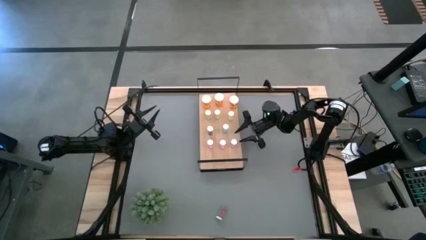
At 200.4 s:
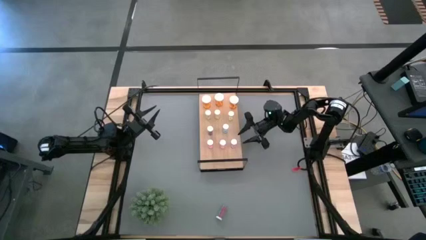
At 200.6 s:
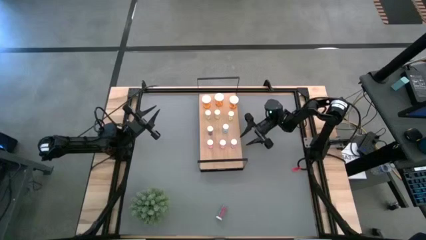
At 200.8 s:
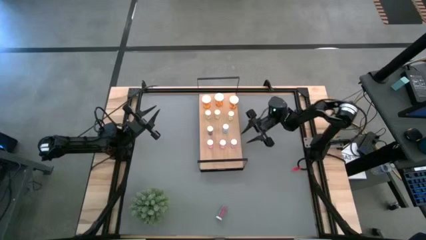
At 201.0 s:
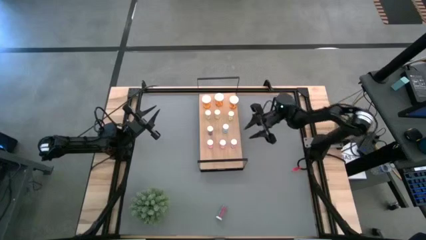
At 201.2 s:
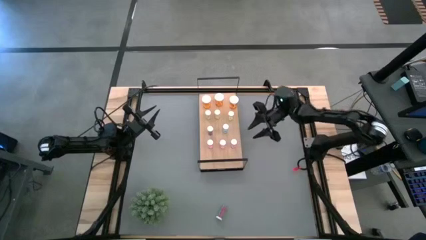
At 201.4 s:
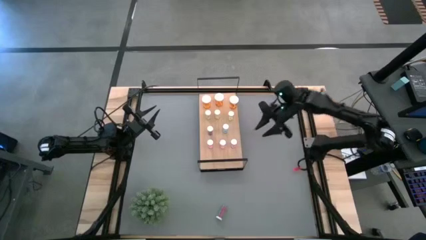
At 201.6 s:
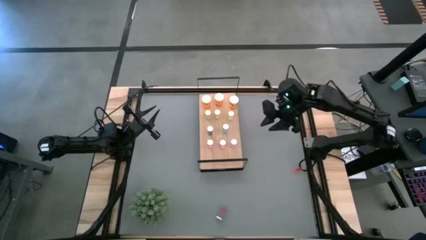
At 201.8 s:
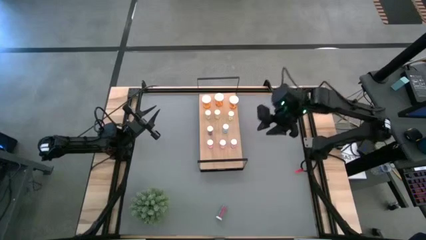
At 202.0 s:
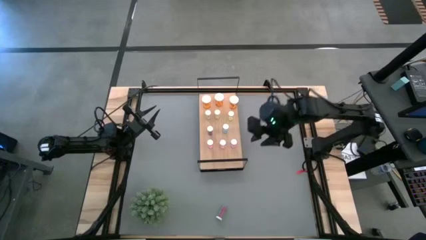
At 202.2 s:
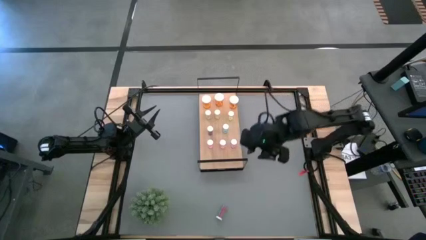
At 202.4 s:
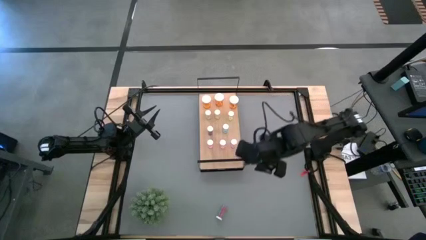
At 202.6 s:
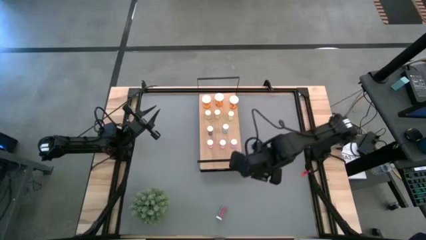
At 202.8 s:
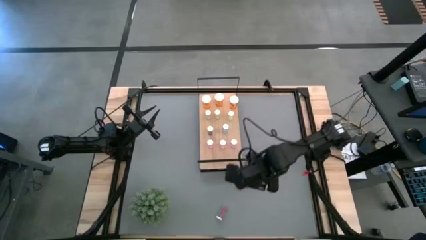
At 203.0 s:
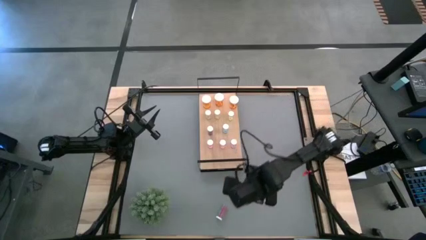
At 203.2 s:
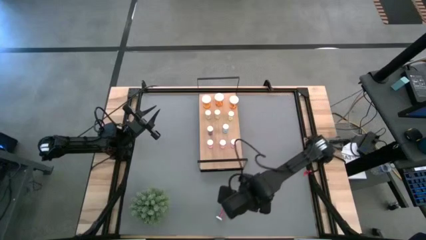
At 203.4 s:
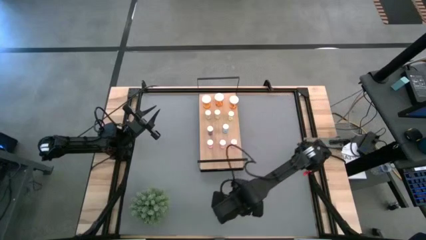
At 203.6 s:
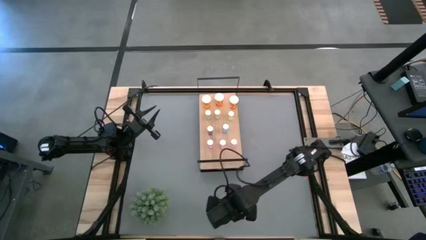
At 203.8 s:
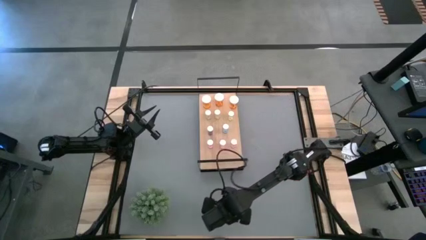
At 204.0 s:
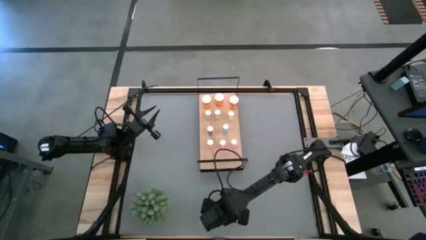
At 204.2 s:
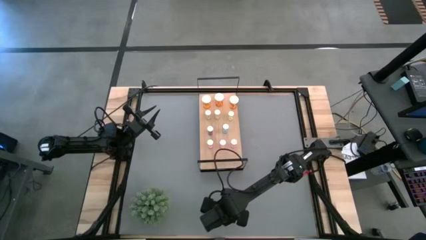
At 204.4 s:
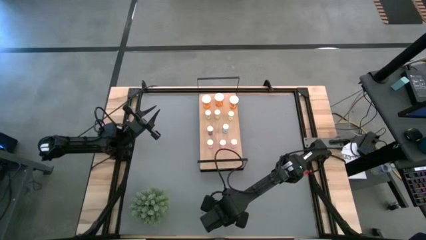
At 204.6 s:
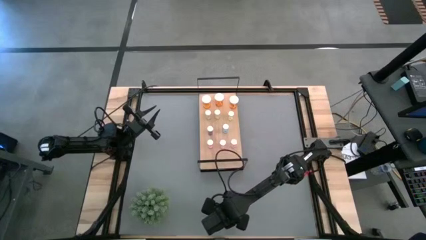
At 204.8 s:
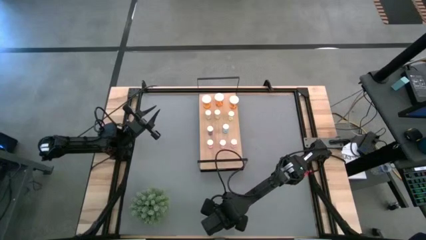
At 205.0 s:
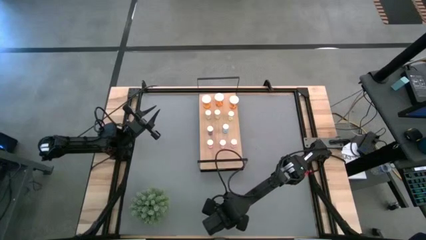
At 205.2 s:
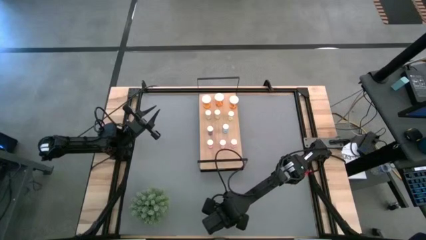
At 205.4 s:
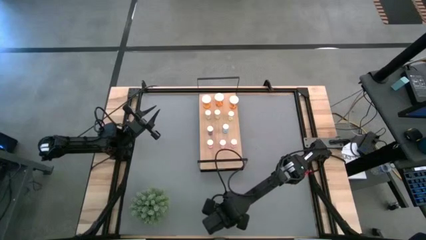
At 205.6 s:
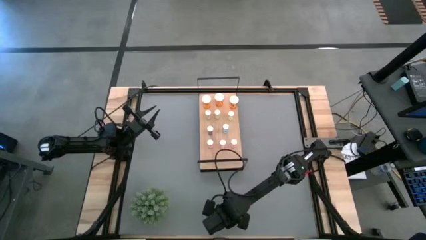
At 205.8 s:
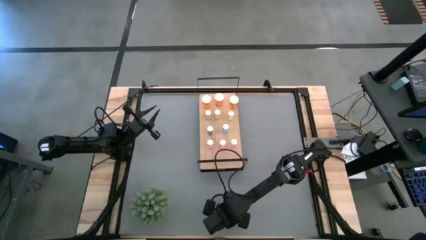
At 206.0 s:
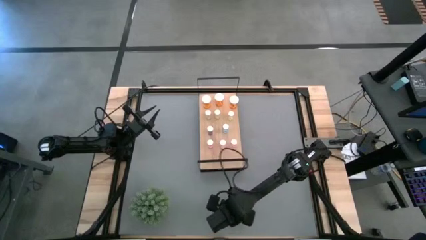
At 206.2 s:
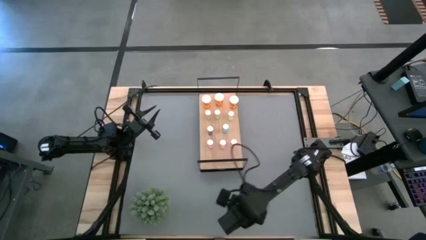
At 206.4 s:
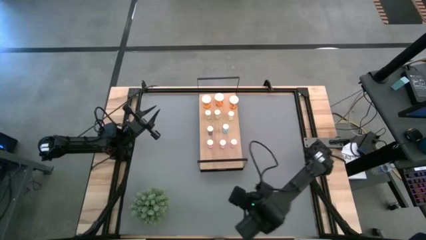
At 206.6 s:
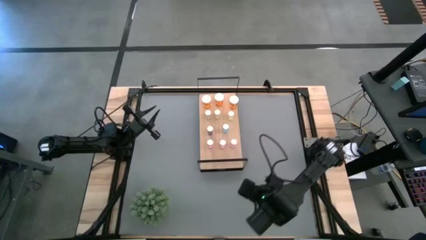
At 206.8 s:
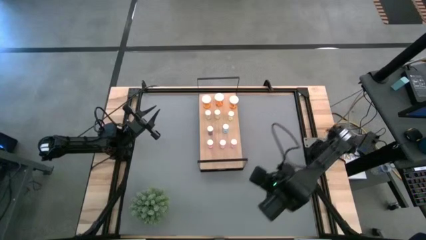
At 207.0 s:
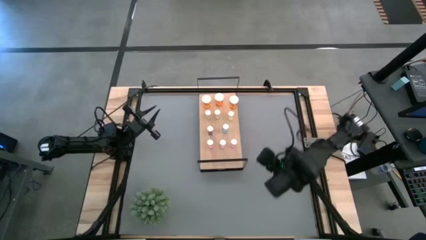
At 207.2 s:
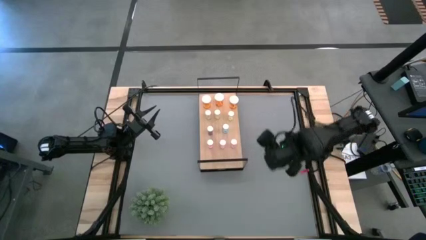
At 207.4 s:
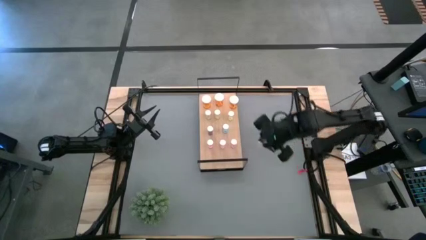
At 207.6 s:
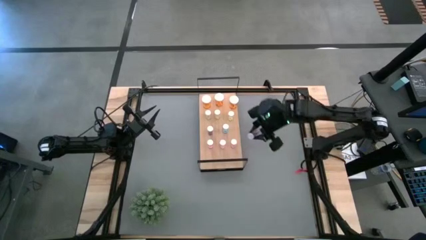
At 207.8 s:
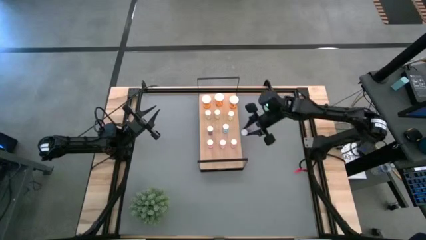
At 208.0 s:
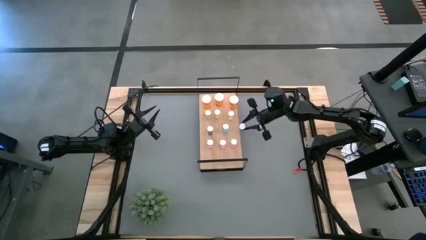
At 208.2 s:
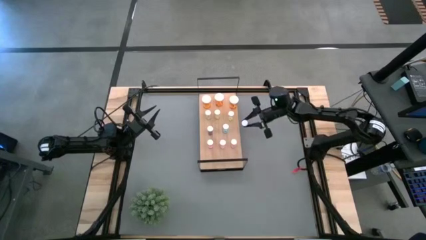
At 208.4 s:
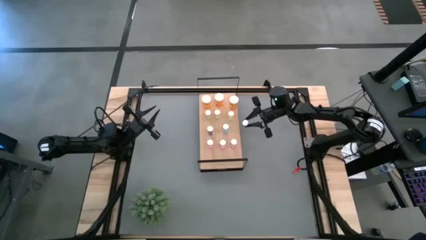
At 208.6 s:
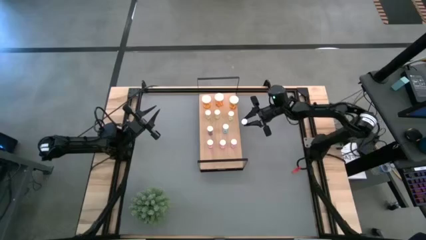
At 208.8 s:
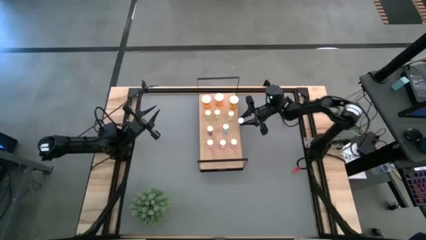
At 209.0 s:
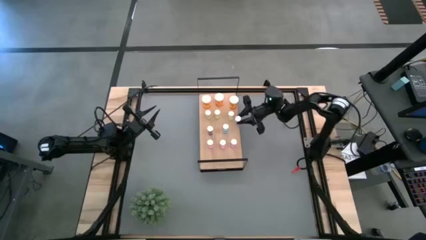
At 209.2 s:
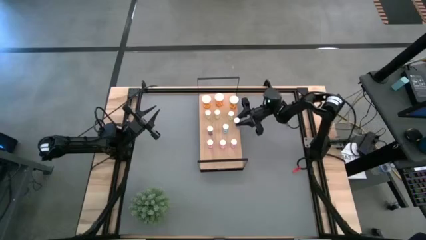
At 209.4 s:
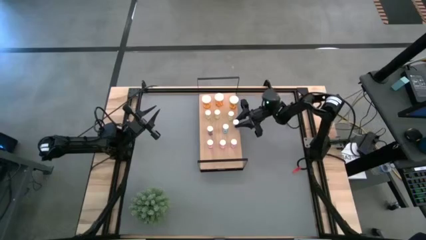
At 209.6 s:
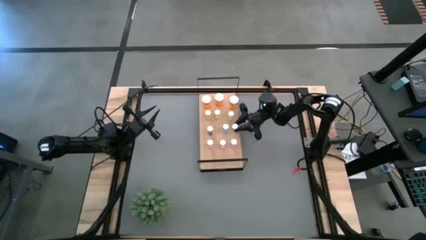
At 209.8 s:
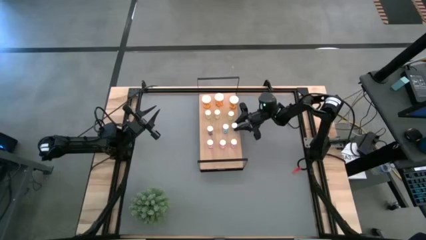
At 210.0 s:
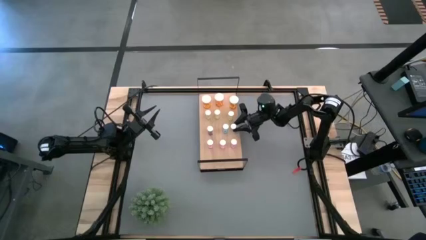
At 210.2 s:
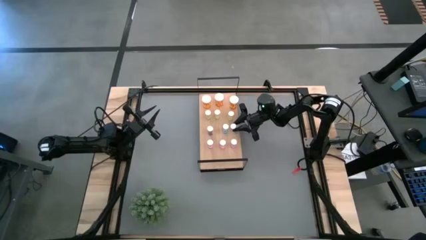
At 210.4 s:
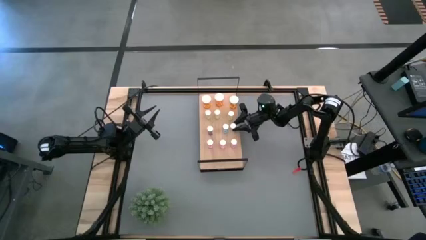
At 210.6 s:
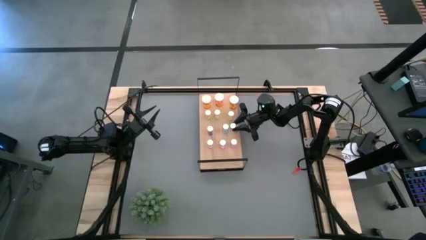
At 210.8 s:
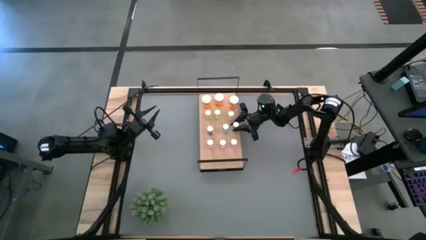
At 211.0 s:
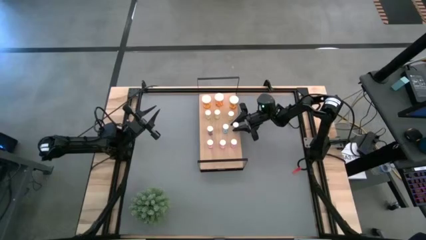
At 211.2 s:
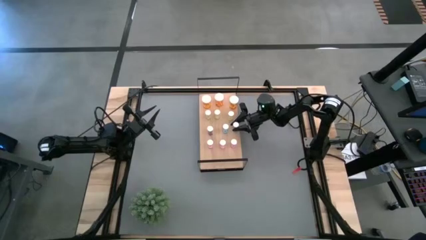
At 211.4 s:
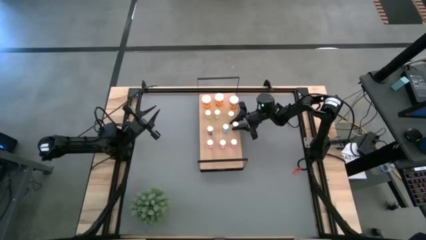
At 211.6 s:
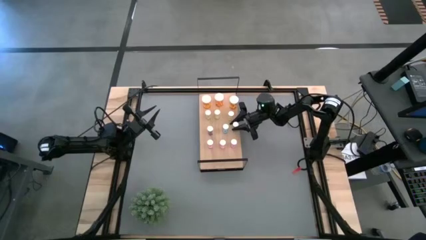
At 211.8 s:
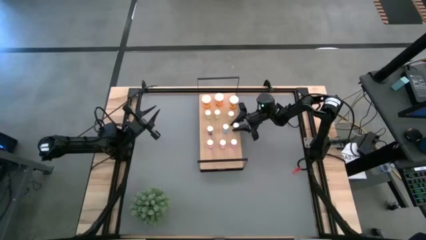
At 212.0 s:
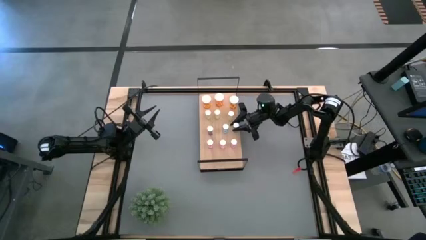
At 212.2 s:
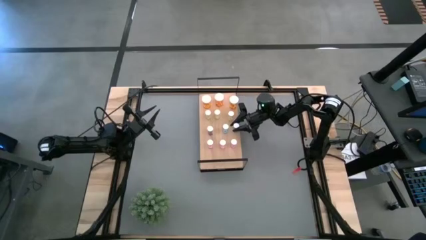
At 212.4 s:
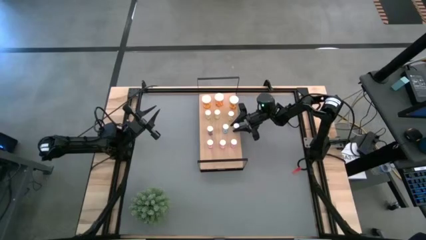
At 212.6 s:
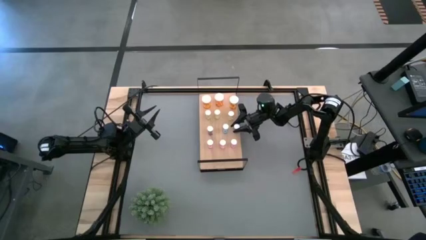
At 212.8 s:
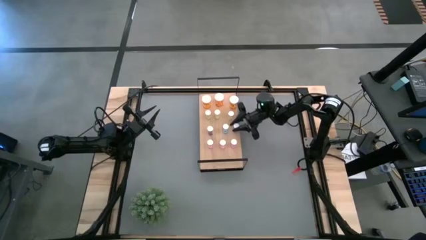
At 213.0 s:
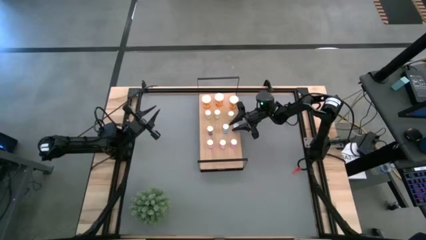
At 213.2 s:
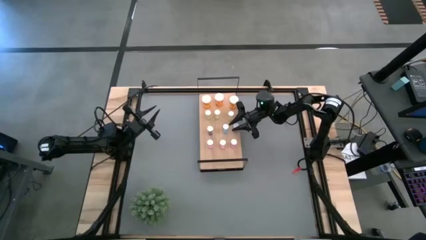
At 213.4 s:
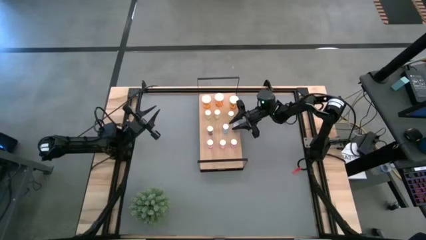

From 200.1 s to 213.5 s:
Task: Pick and place medicine bottles onto shelf by color
Put the blue pill bottle on the shelf aligned with the other blue pill bottles
